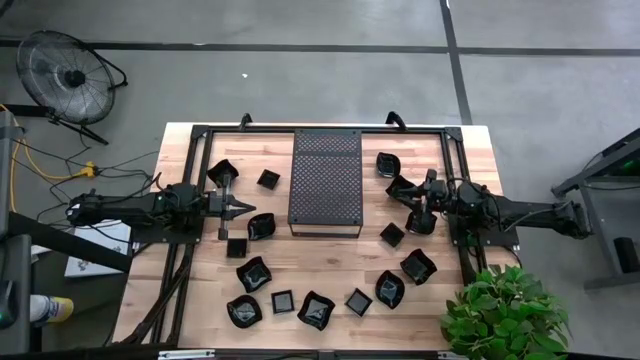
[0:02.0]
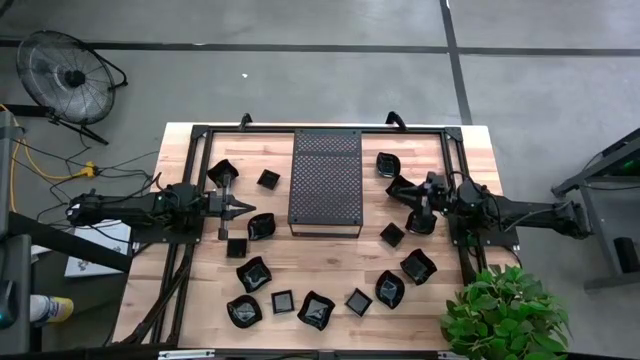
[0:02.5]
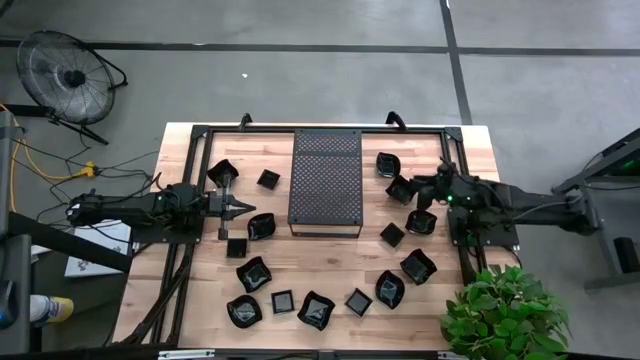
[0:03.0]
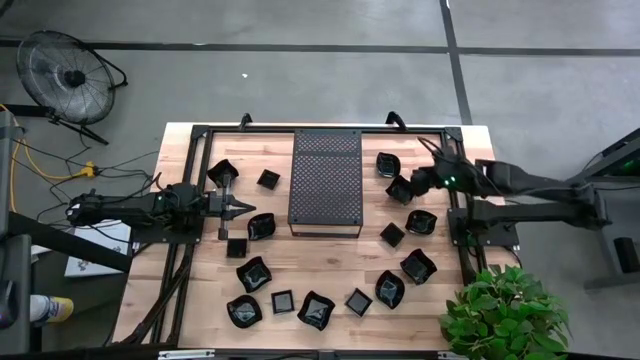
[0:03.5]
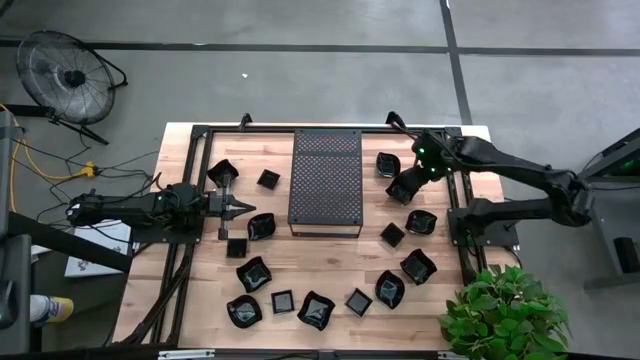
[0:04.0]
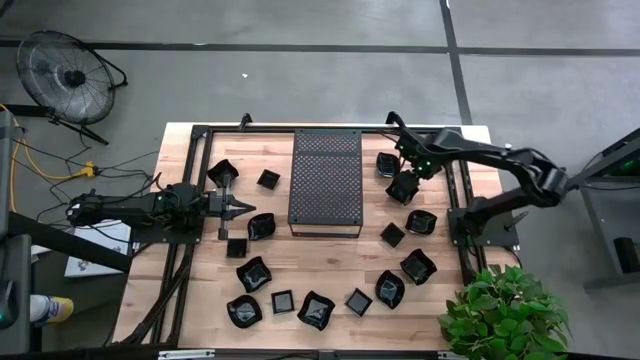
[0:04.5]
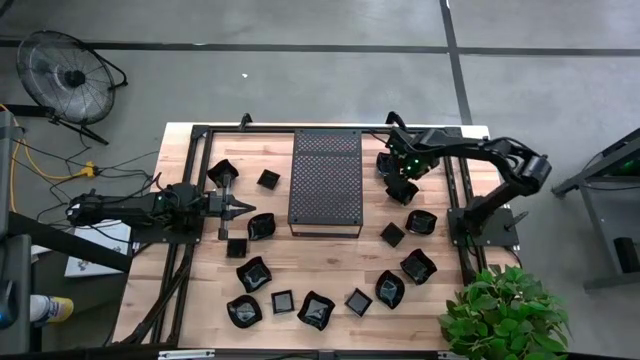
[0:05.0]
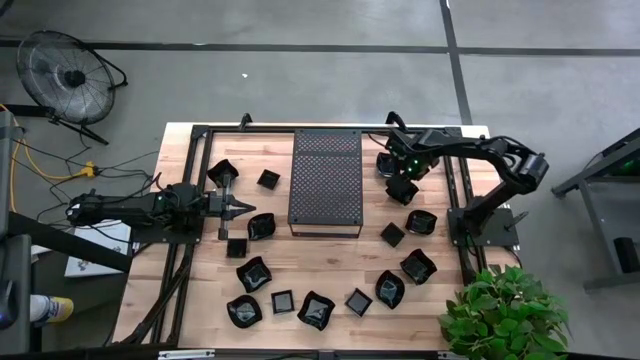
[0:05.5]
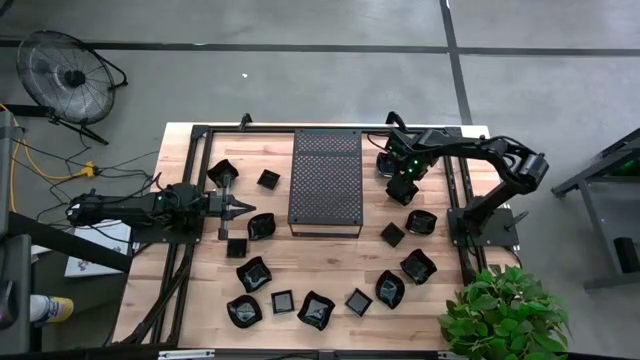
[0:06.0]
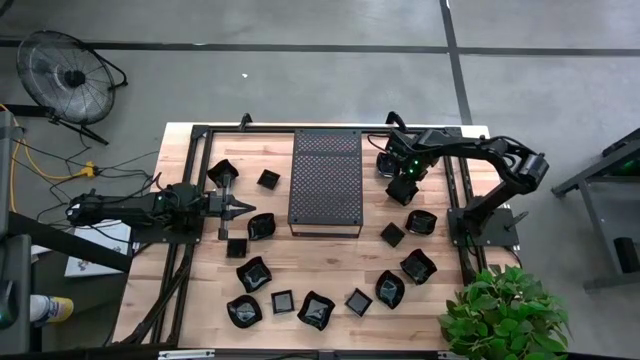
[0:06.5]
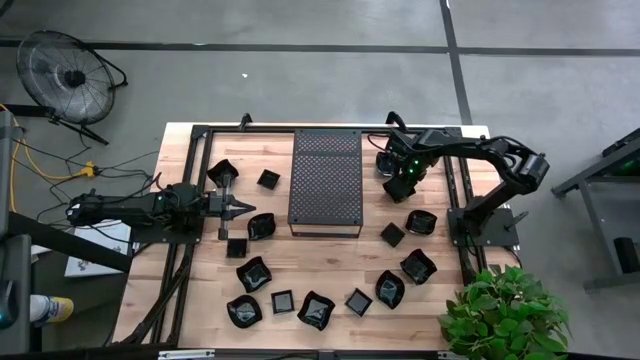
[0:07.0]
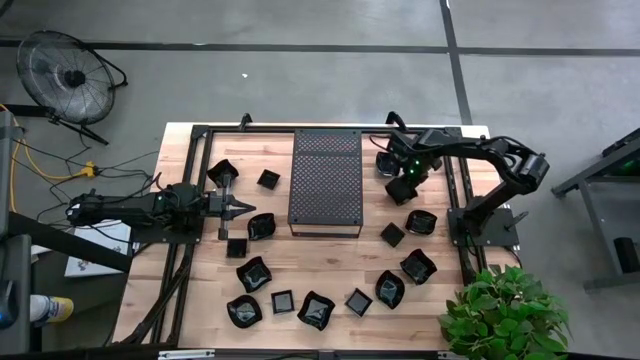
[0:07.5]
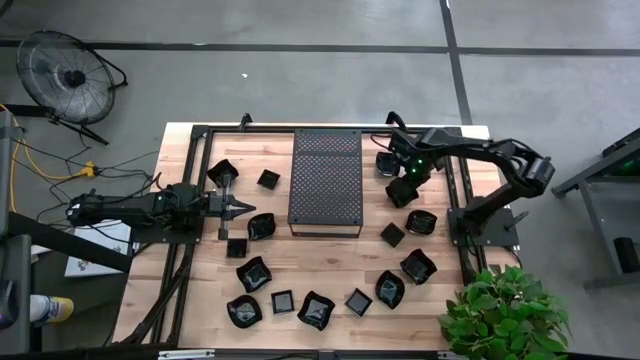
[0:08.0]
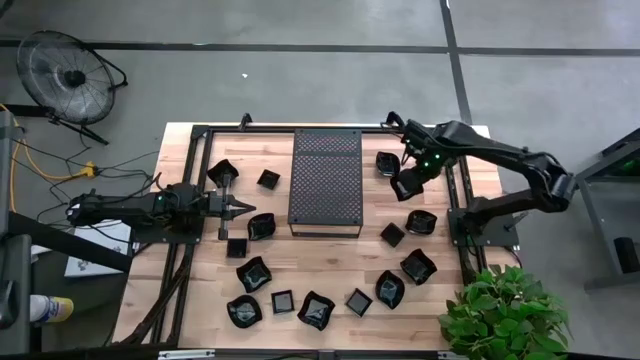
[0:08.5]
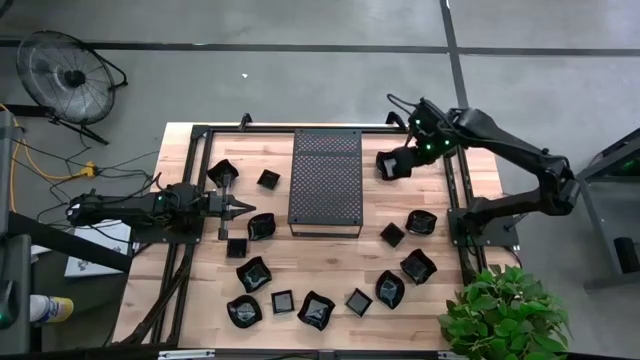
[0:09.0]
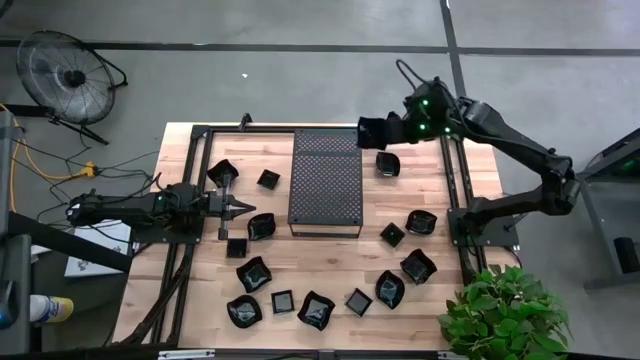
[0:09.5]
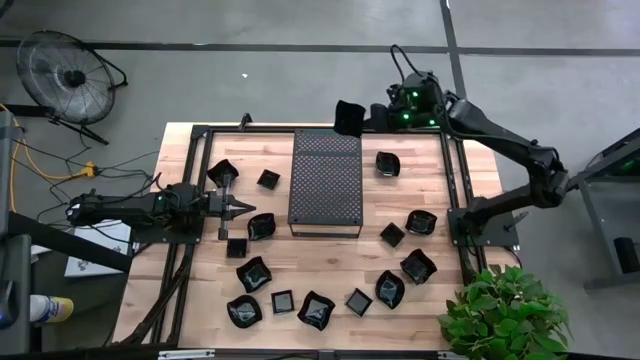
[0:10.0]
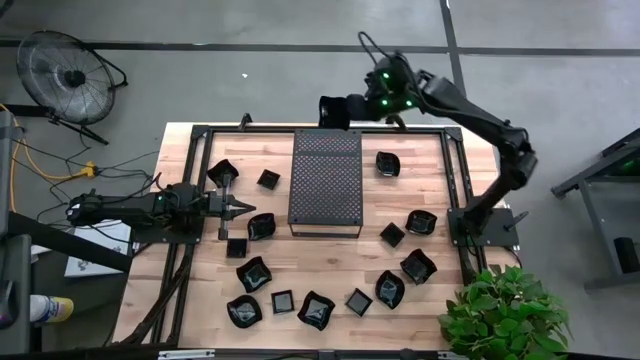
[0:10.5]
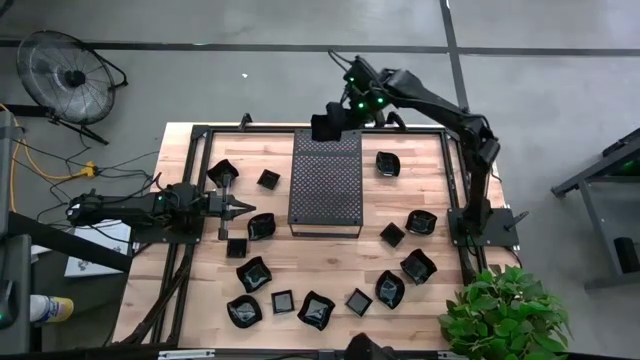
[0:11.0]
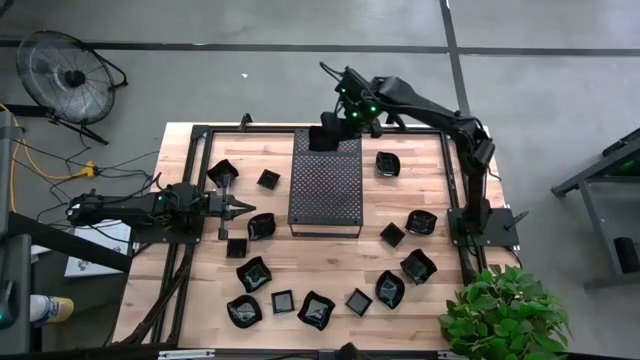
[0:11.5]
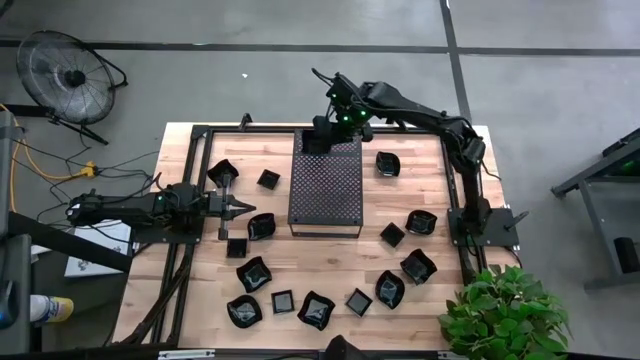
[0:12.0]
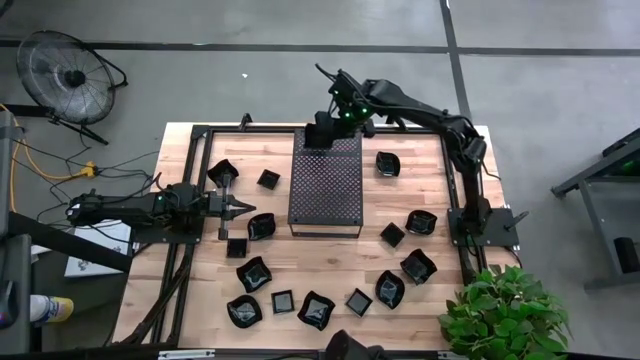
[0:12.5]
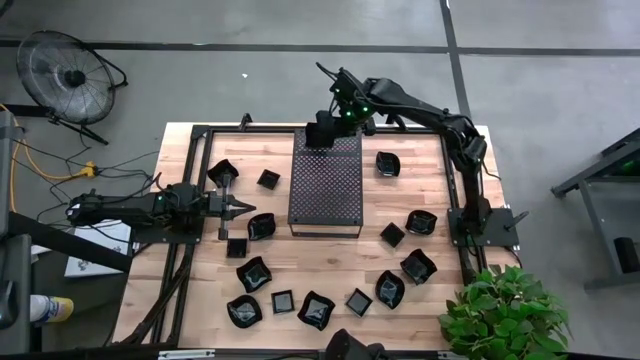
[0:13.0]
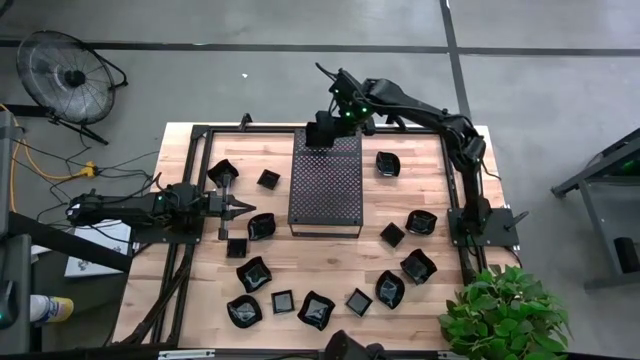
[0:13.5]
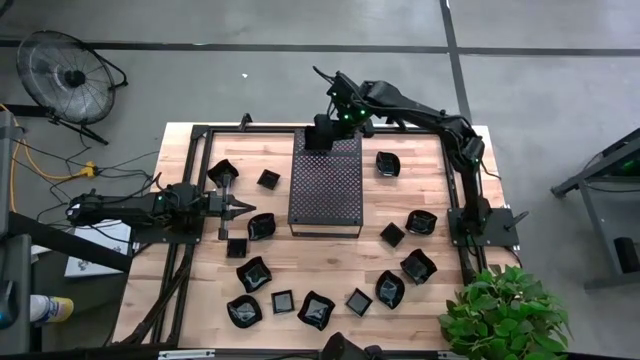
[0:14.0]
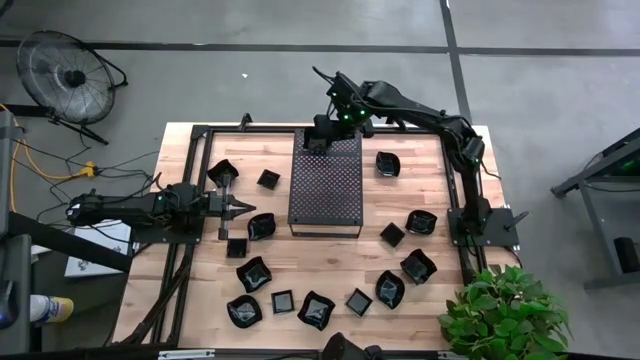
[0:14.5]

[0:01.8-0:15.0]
Task: Pick & Place Mini shaped plates
Put the black distorted square plate on the shelf

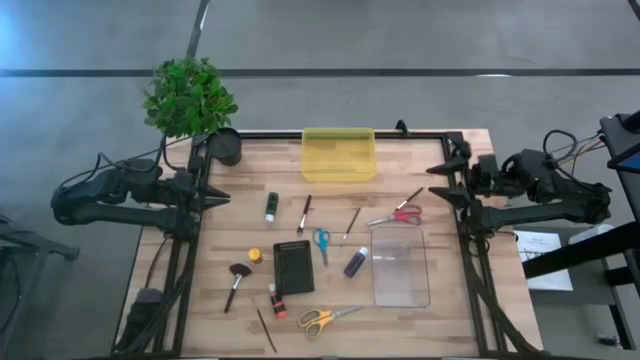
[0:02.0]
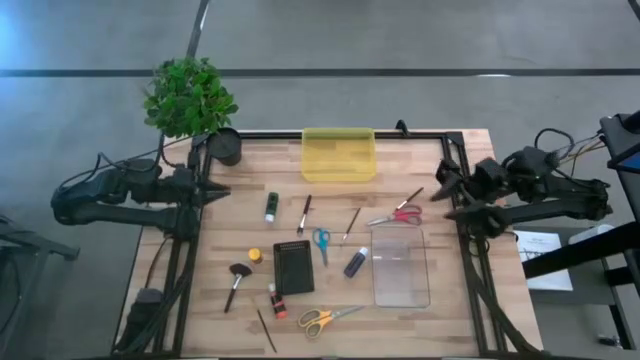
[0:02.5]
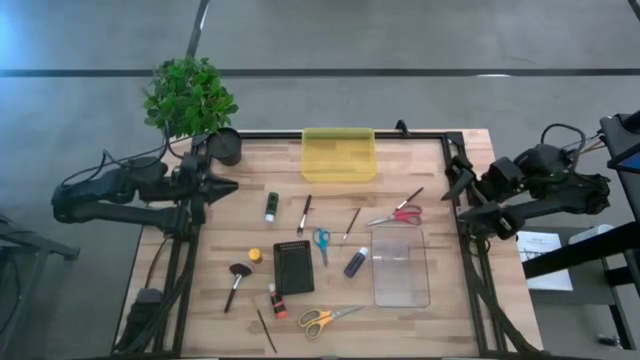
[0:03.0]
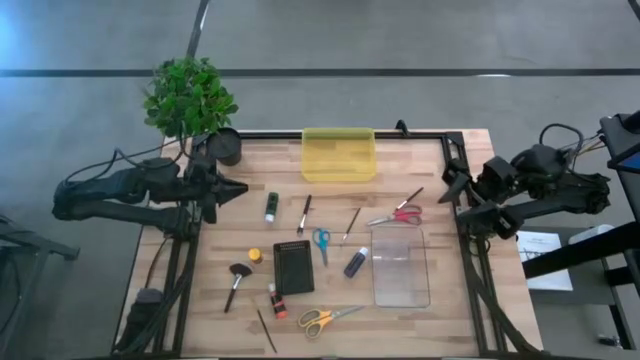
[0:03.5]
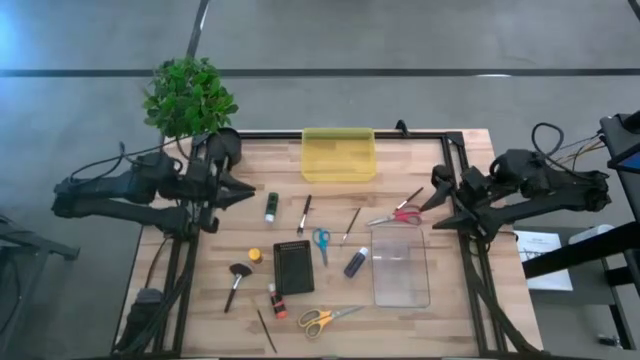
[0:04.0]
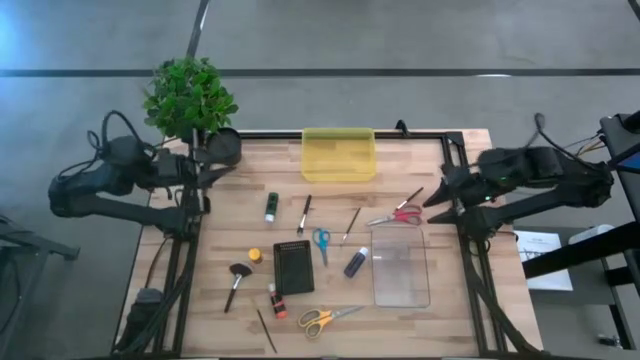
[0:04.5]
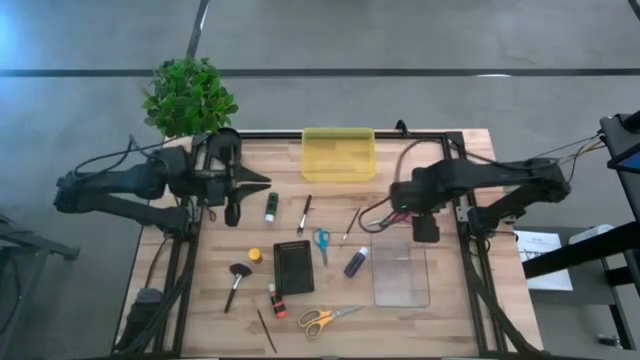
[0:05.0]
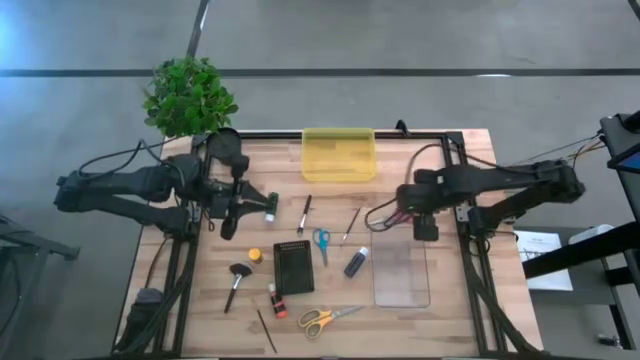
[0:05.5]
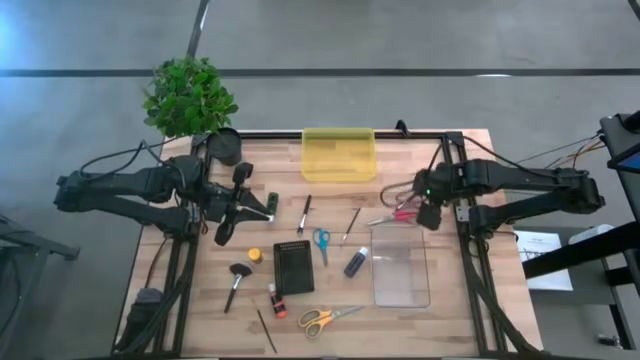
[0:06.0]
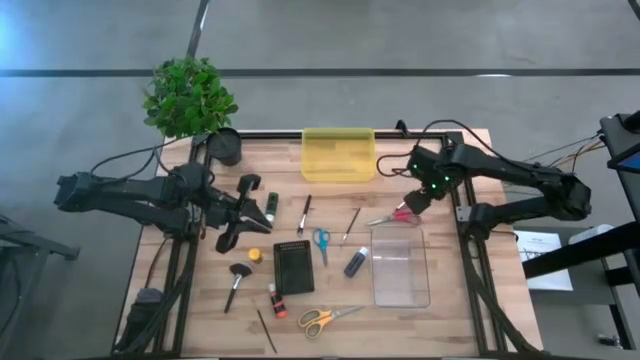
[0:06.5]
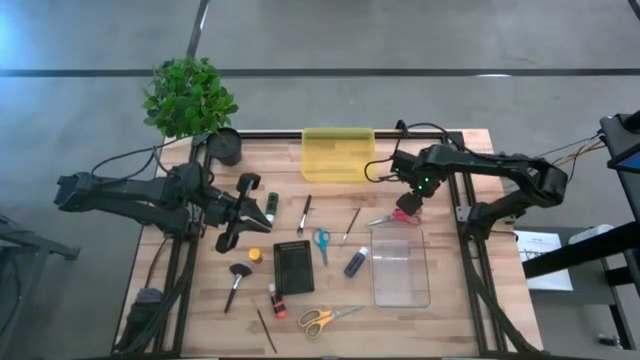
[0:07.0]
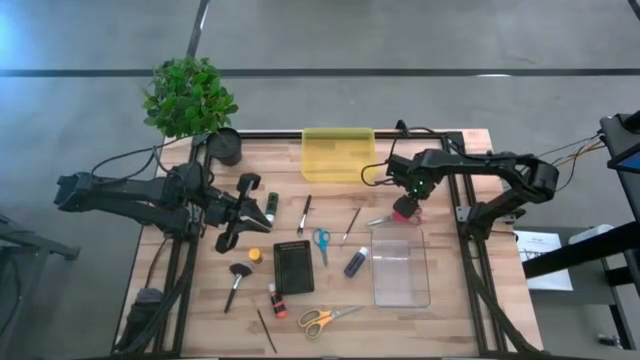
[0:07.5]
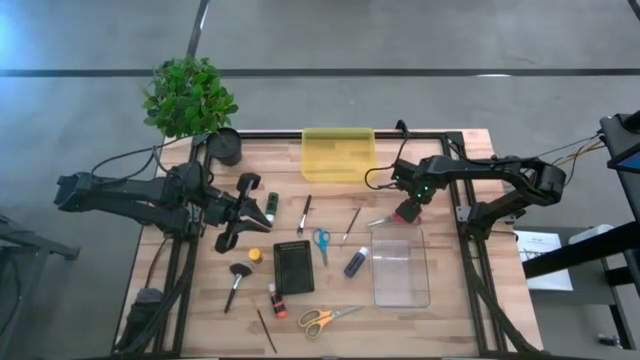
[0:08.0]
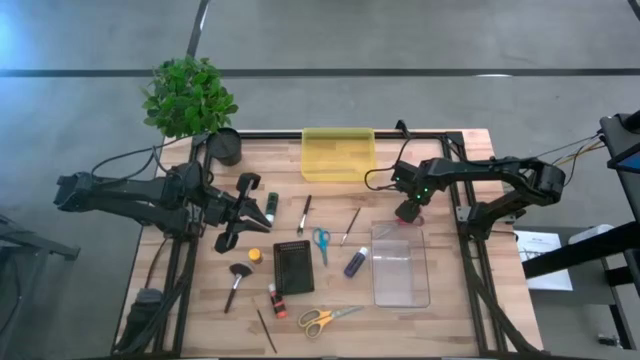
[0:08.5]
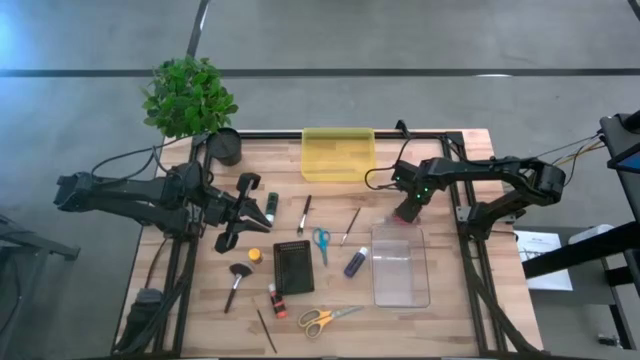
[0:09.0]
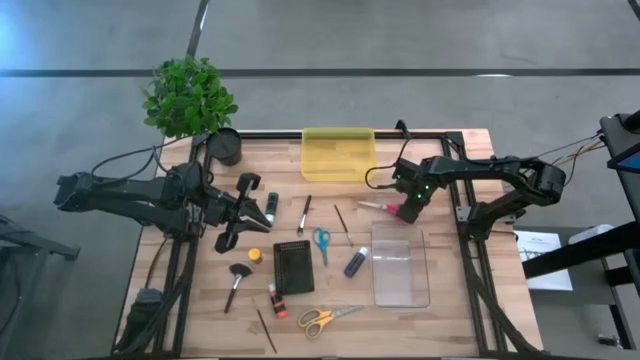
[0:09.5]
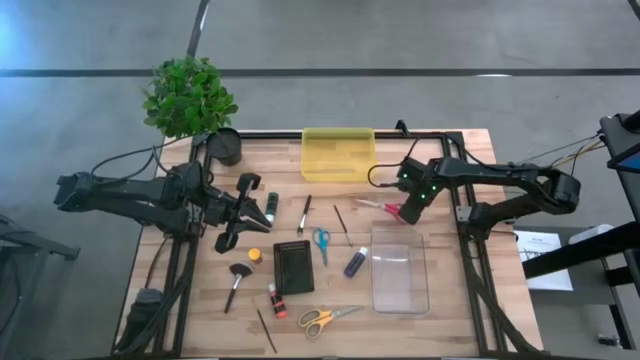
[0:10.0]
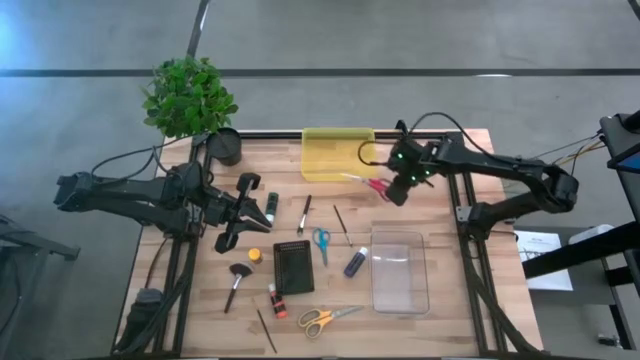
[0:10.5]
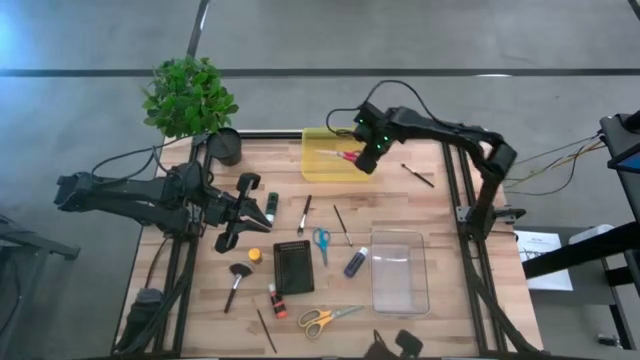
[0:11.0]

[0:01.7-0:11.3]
Task: Pick & Place Paint Supplies
Put the red scissors into the yellow bin
